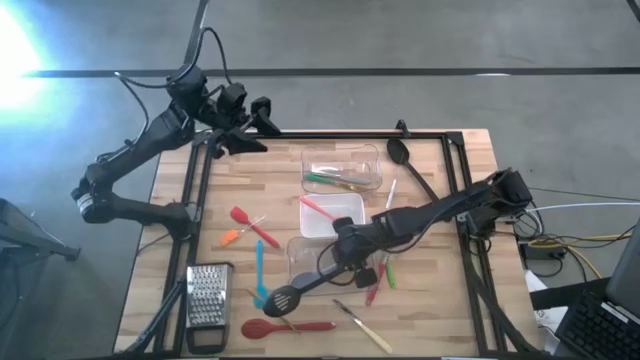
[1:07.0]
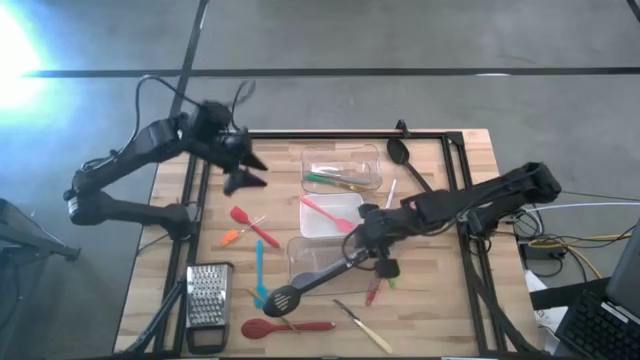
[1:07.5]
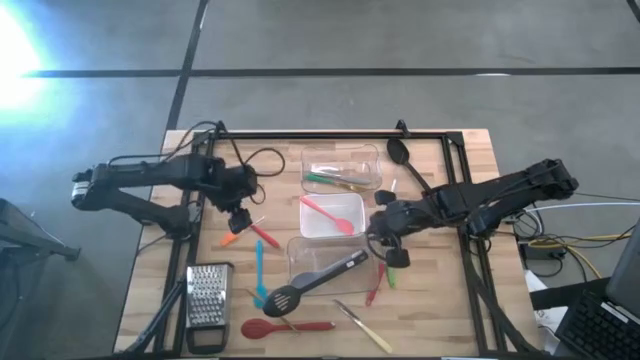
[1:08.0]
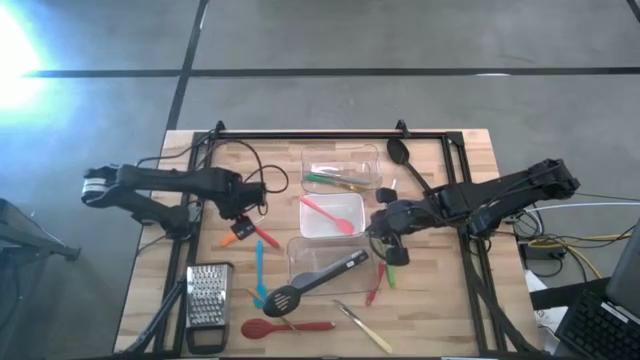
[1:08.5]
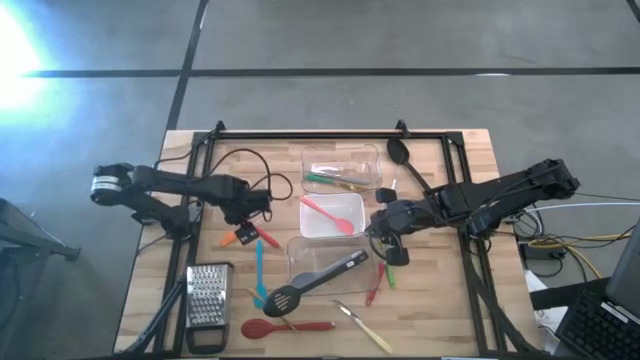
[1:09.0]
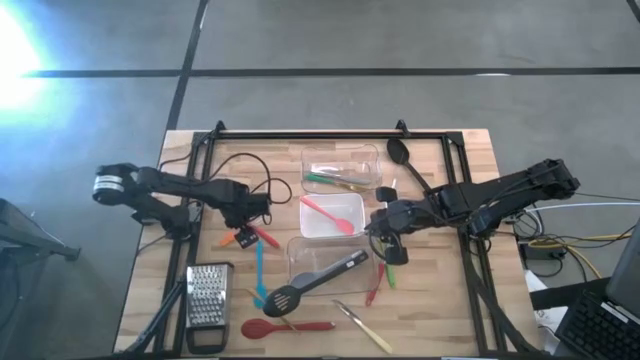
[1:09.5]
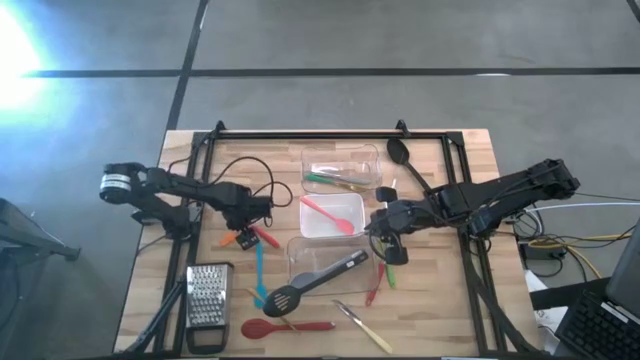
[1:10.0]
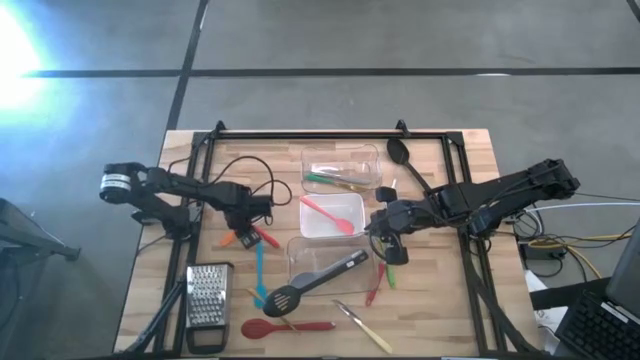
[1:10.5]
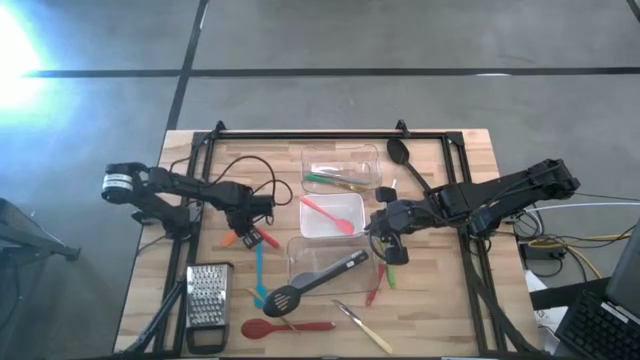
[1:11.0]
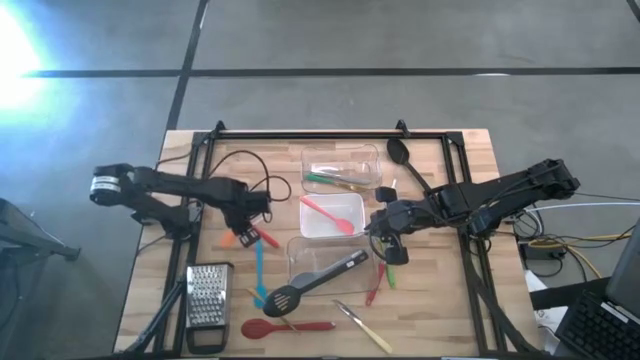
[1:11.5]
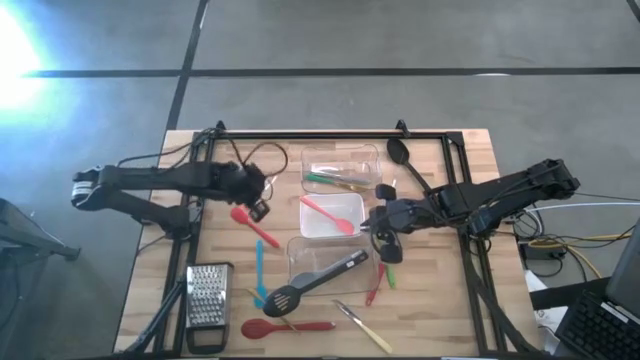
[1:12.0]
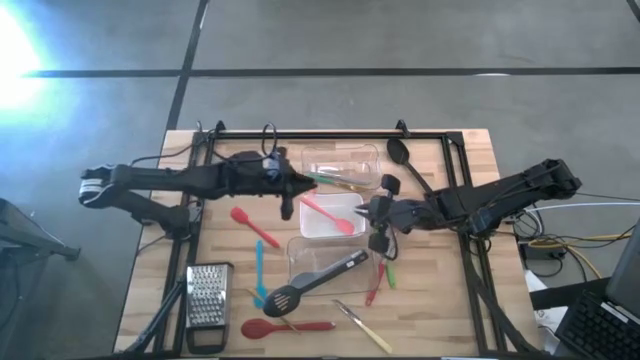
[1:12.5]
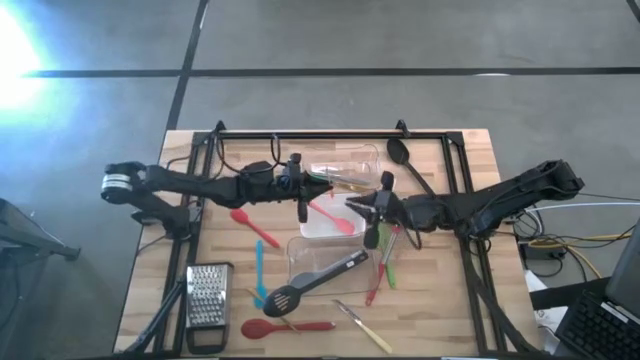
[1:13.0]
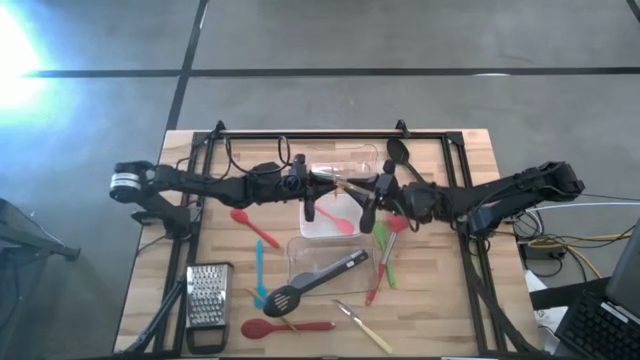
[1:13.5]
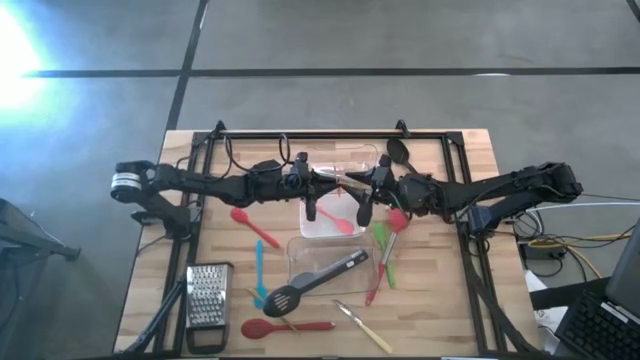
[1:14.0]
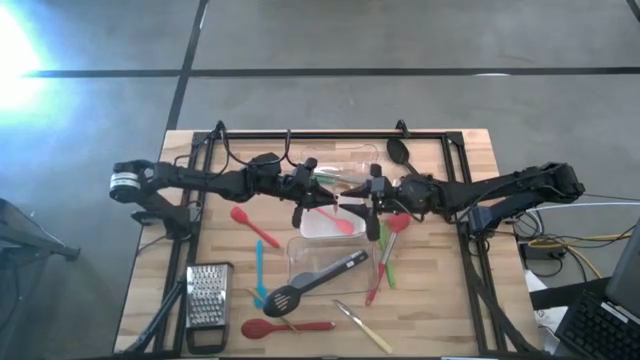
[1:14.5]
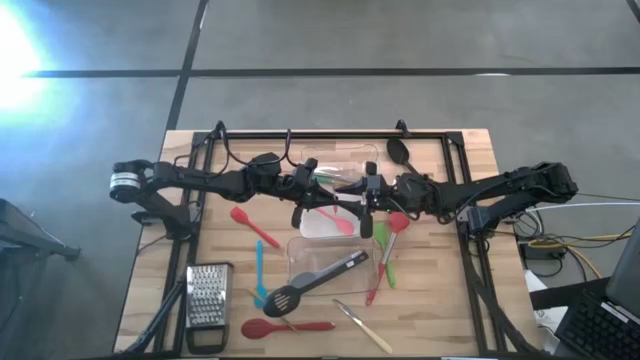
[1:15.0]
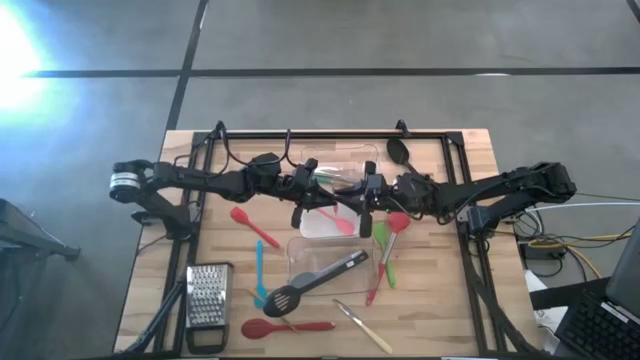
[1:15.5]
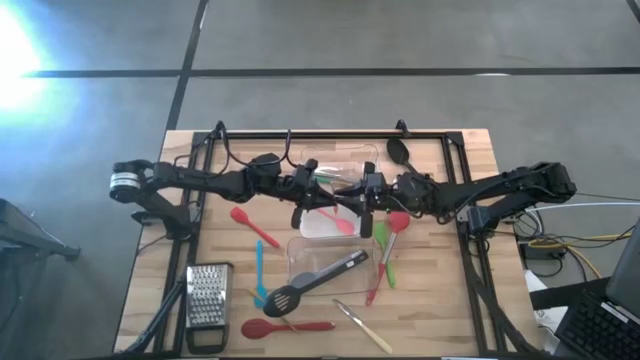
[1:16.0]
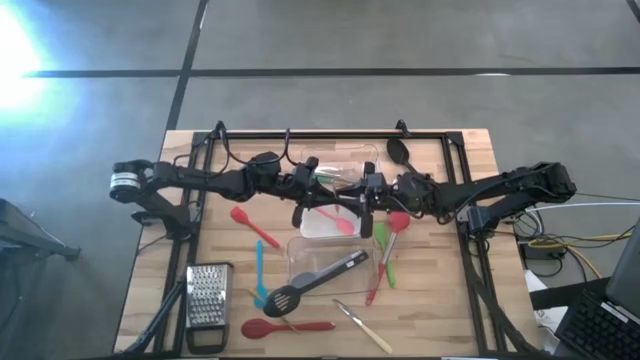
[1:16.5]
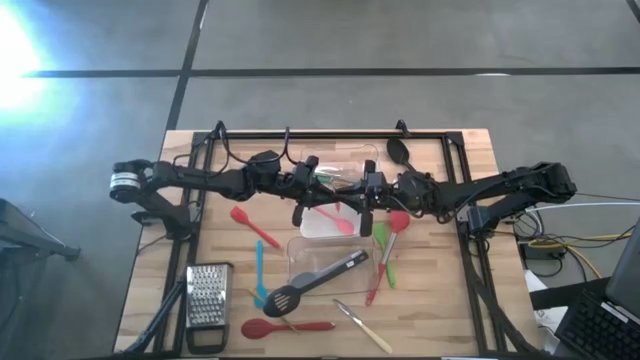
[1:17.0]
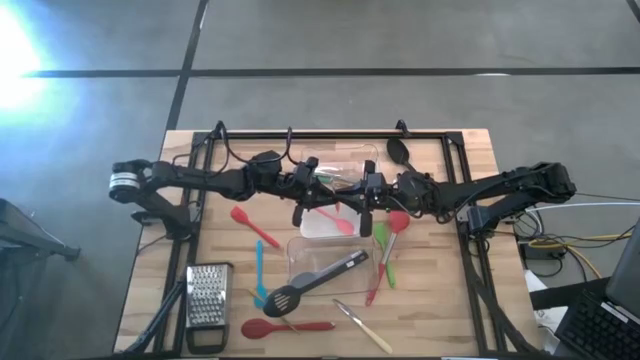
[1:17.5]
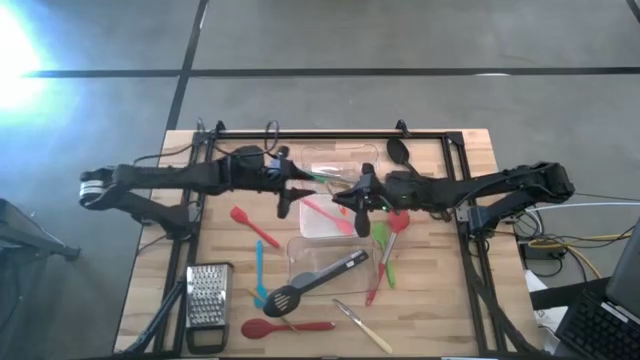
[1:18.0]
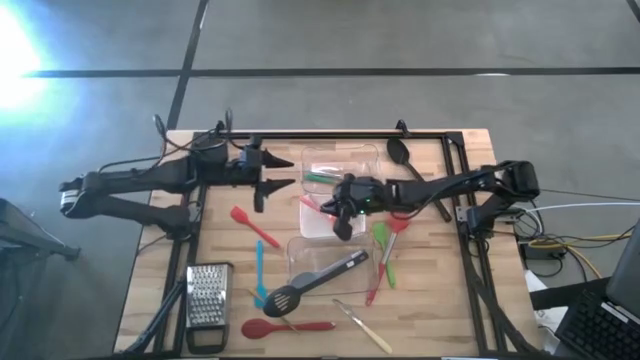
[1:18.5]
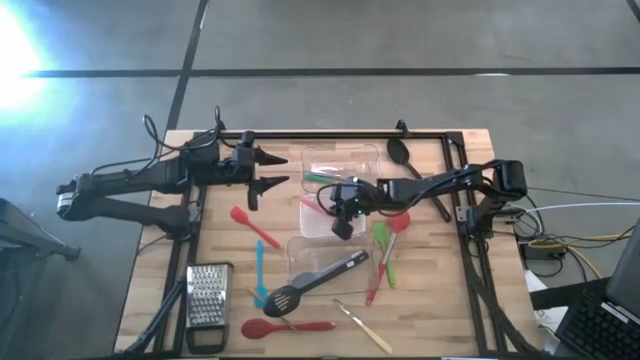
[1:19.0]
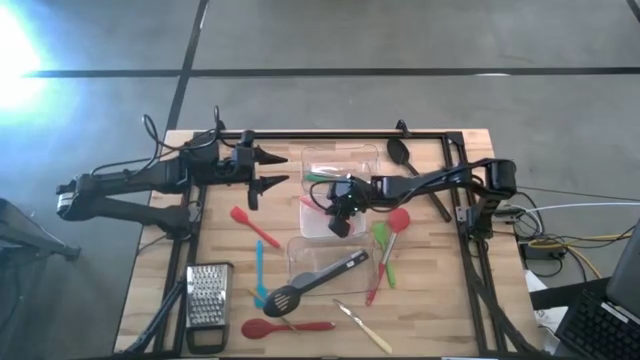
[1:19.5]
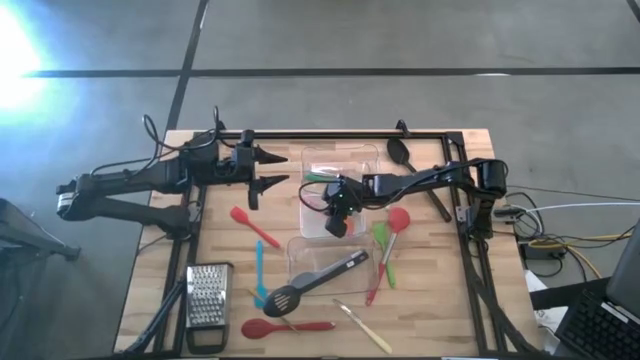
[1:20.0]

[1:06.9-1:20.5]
Task: Pick & Place Kitchen Items
Put the orange spatula into the white bin

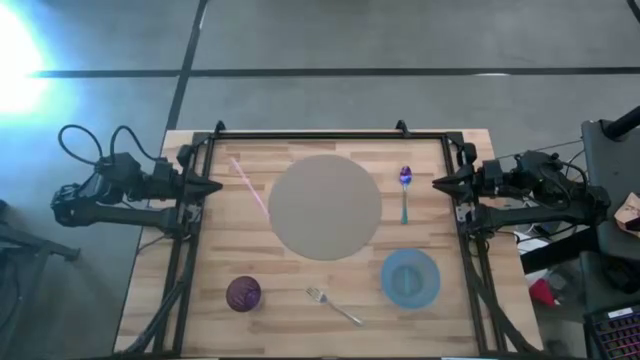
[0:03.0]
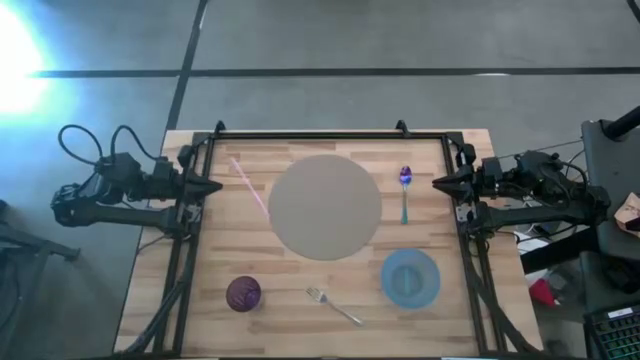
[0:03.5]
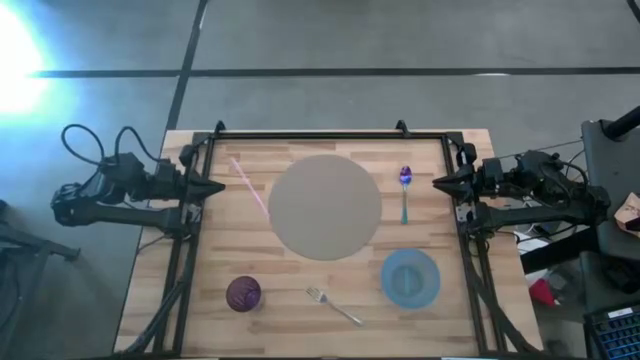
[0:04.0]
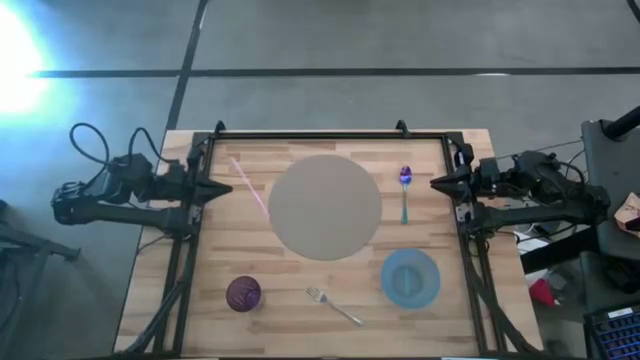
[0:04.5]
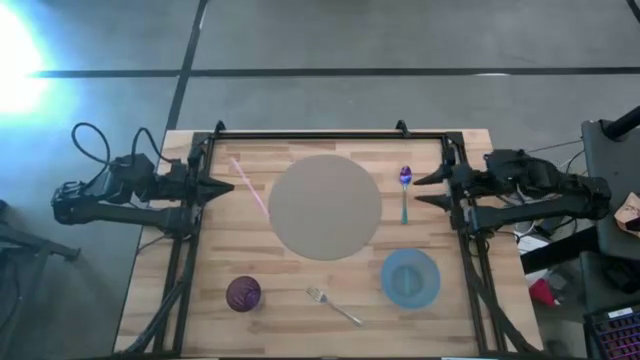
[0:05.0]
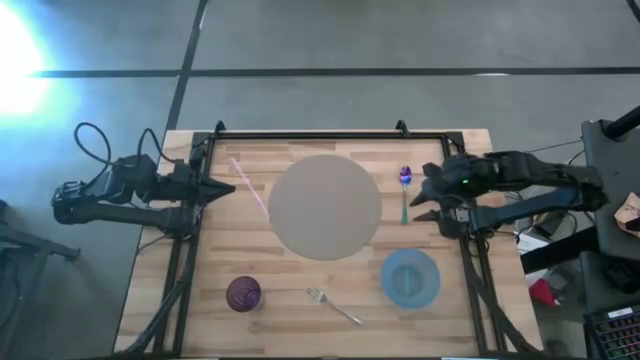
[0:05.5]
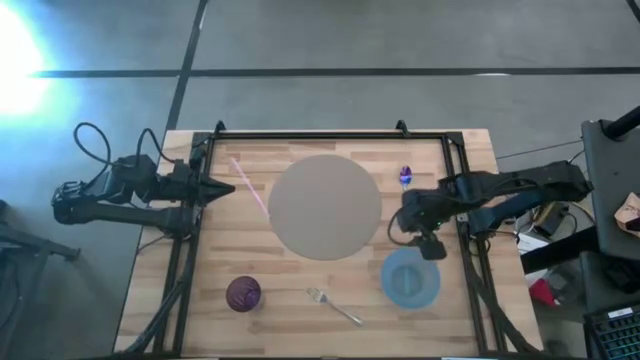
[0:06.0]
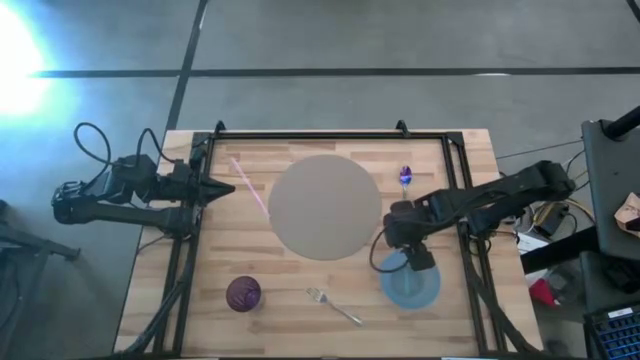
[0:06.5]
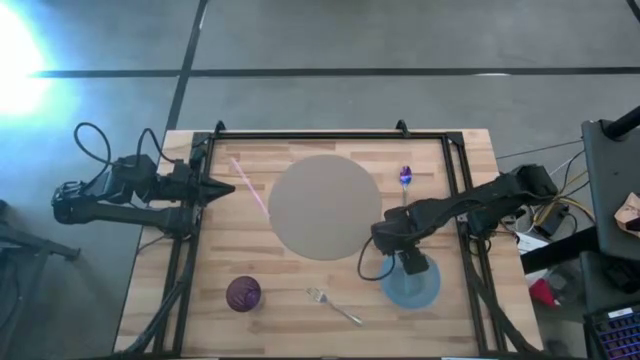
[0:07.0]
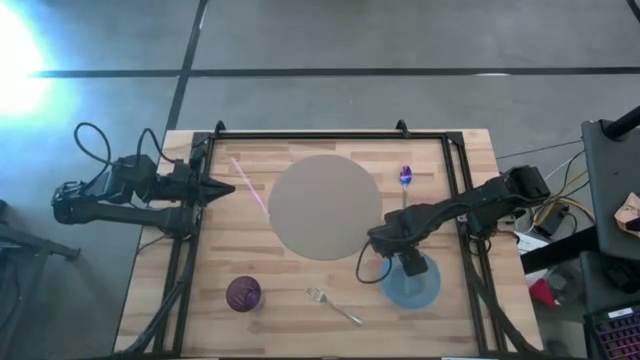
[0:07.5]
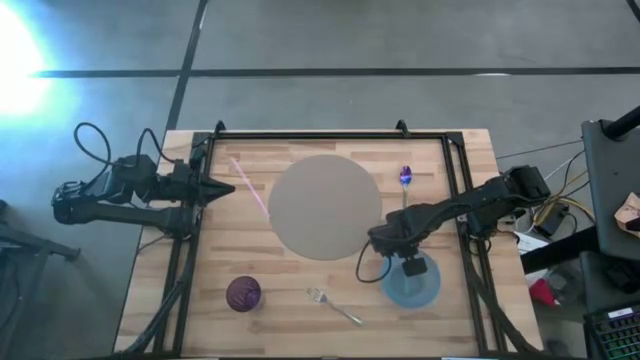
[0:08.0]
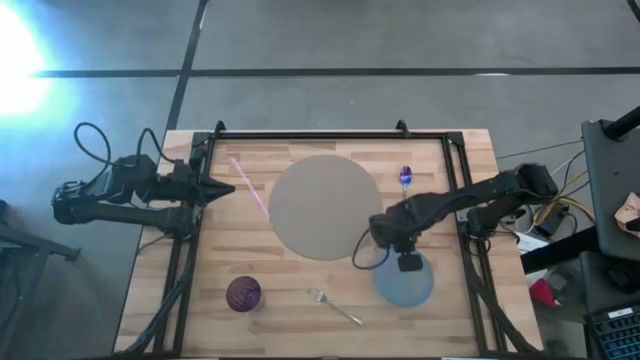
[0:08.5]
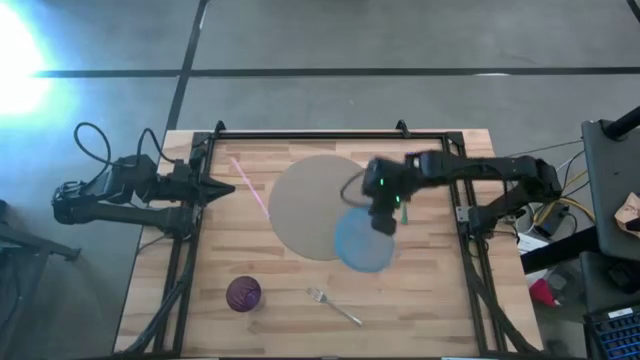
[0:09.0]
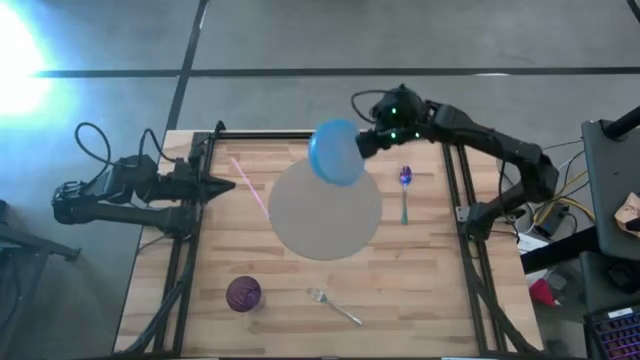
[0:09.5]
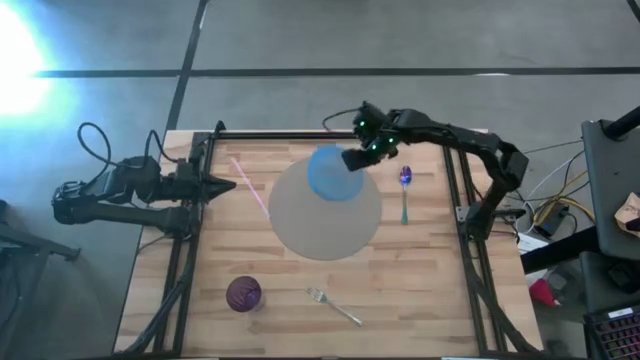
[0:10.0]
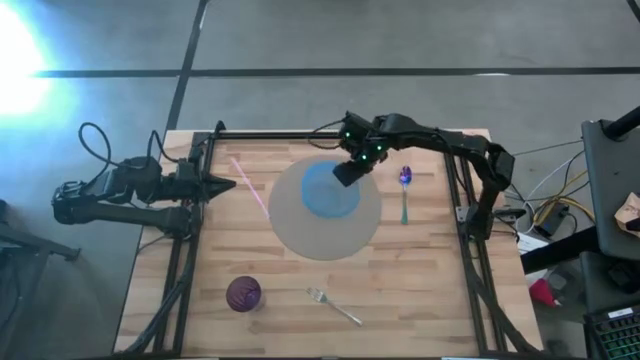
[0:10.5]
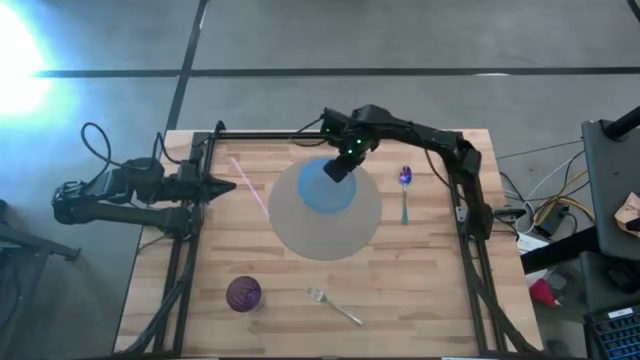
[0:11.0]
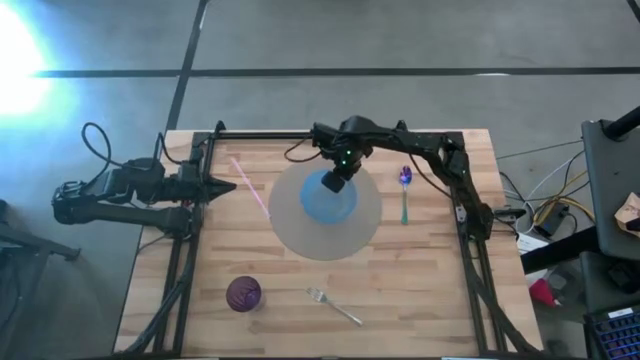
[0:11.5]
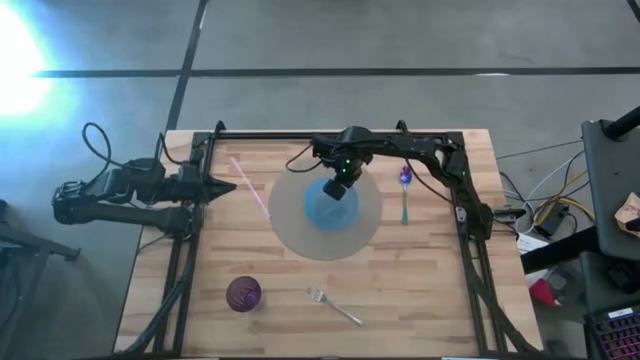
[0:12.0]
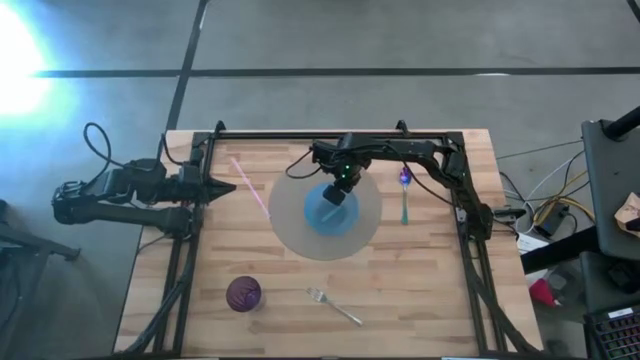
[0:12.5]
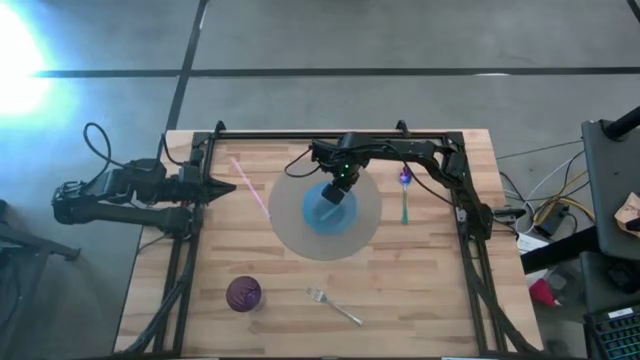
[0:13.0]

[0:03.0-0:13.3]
Task: Pick & Place Utensil
Put the blue bowl on the gray mat
